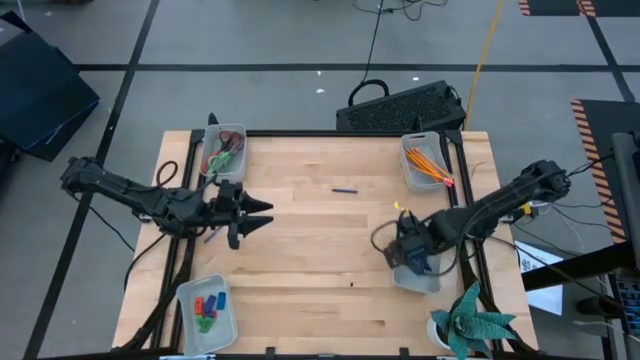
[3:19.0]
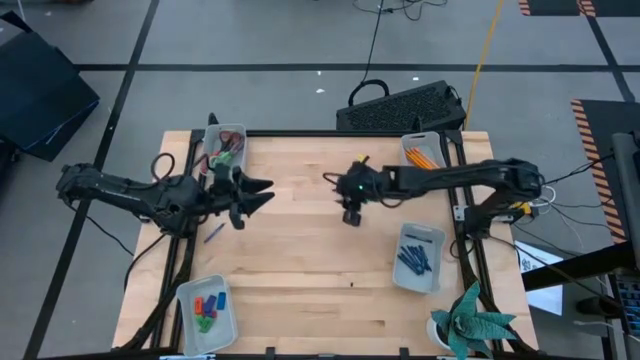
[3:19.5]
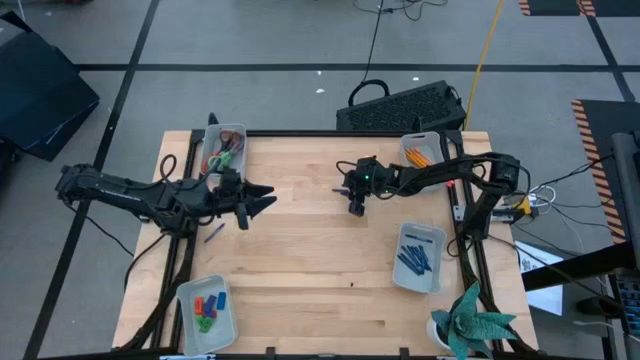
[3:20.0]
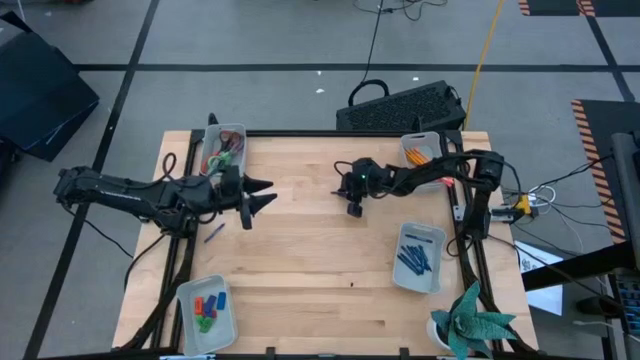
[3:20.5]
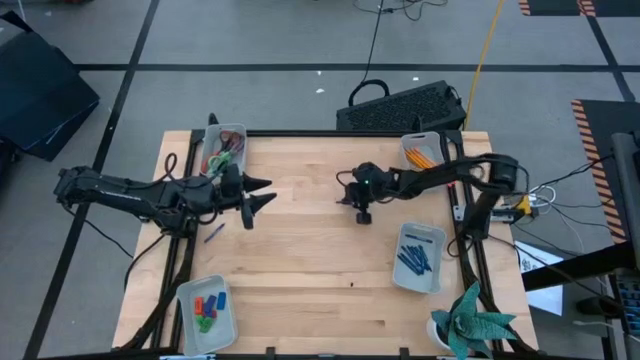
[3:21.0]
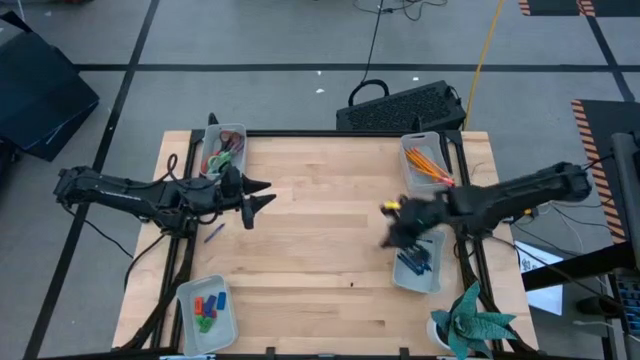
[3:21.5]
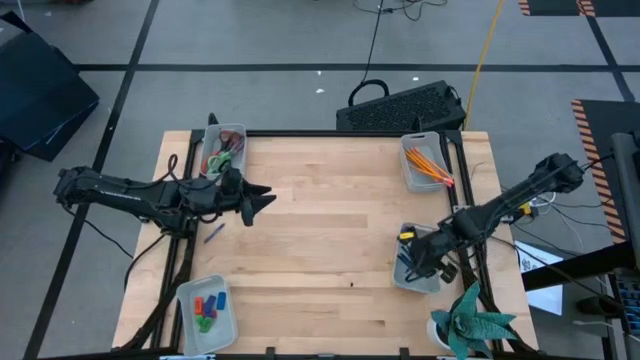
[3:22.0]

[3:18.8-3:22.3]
Task: Sort crayons/erasers/pens/pencils in bins
Put the blue crayon into the middle right gray bin

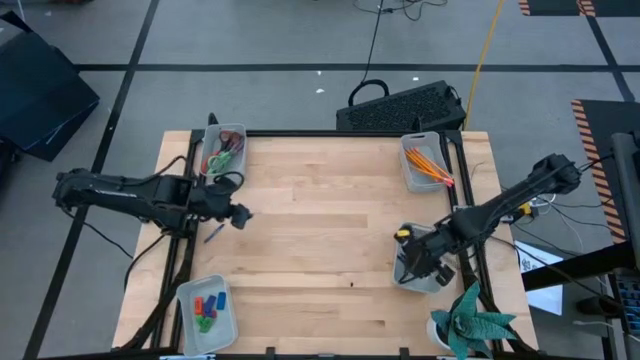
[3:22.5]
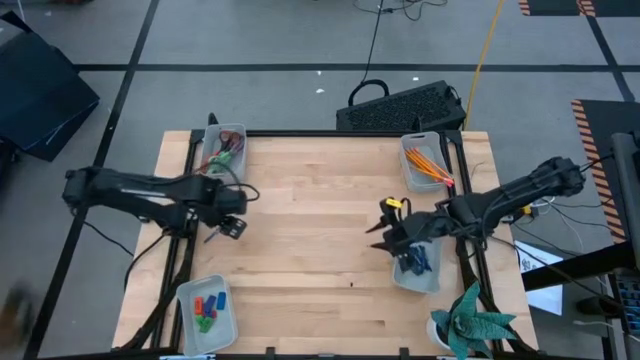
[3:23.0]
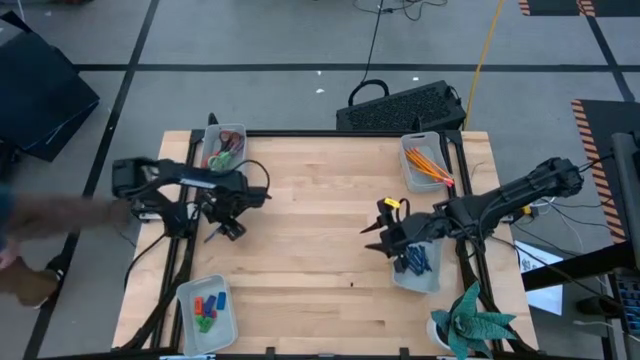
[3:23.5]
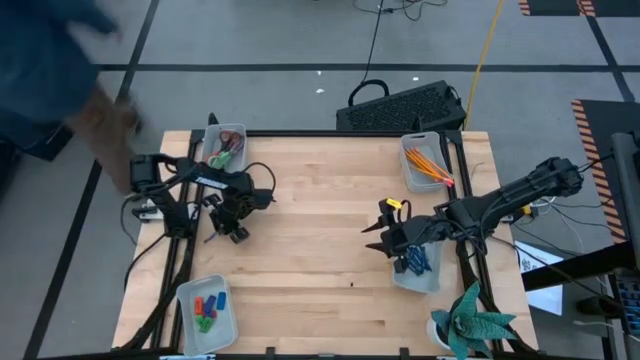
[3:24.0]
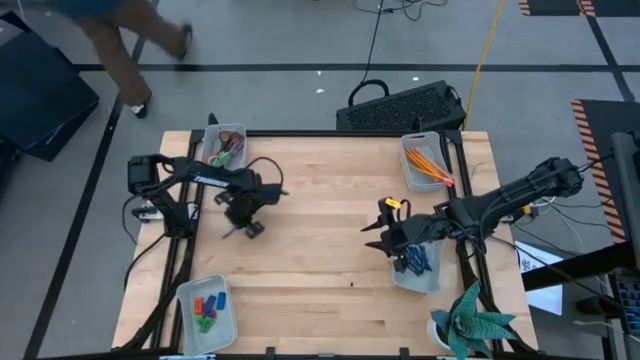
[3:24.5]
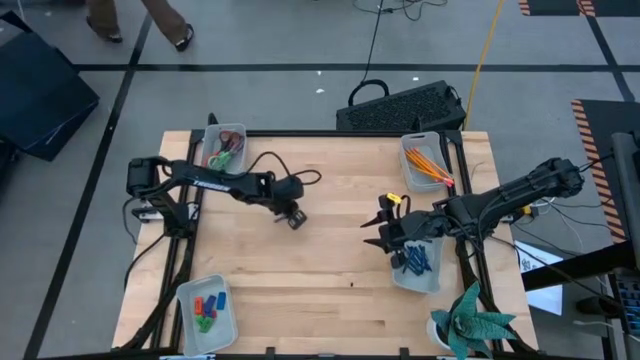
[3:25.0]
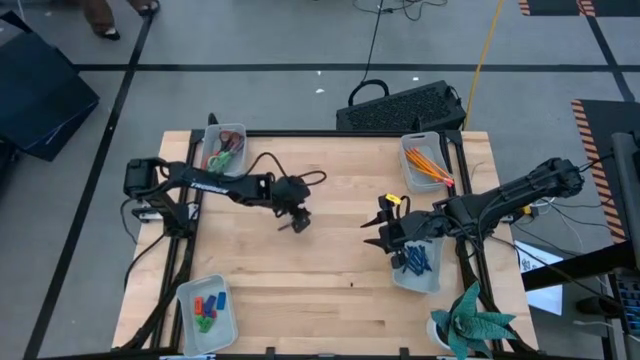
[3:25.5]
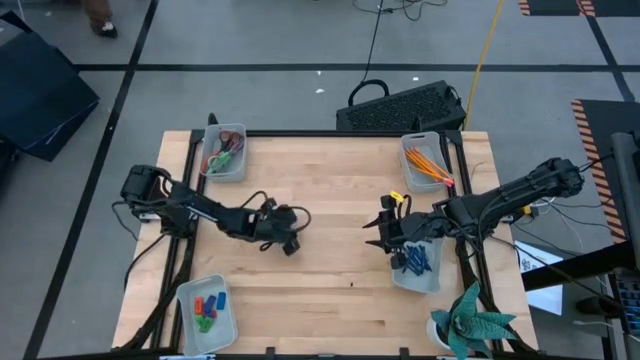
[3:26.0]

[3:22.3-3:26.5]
Put the blue crayon into the middle right gray bin

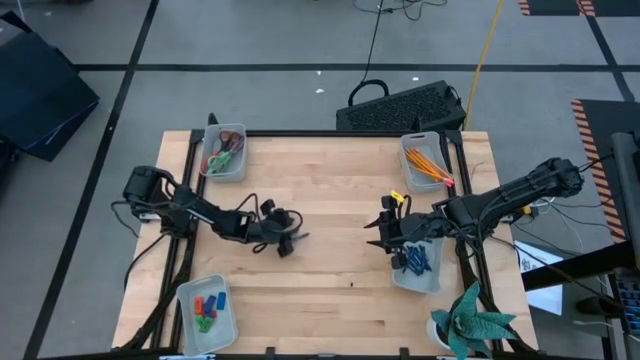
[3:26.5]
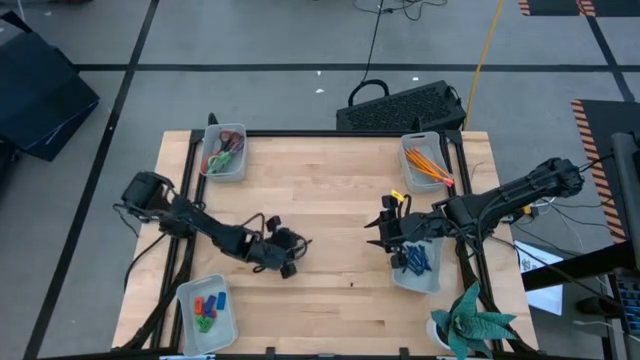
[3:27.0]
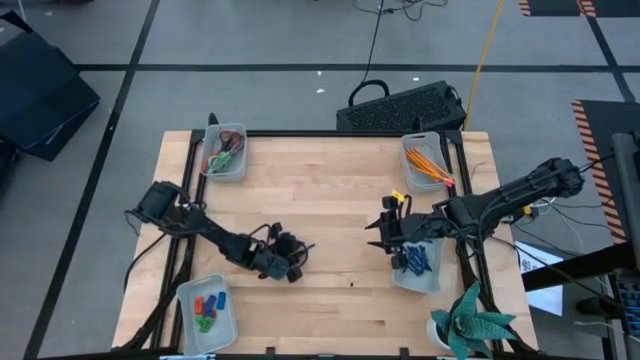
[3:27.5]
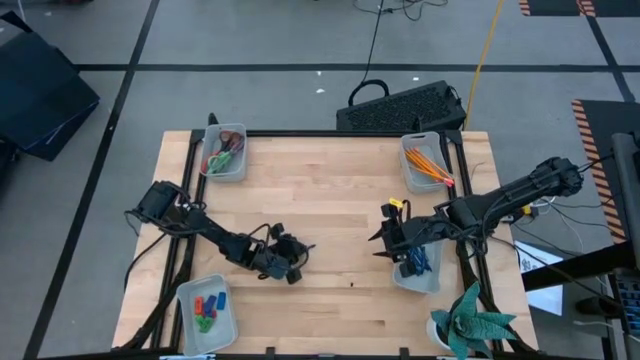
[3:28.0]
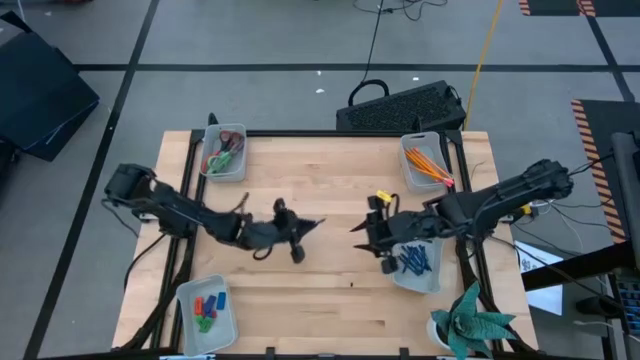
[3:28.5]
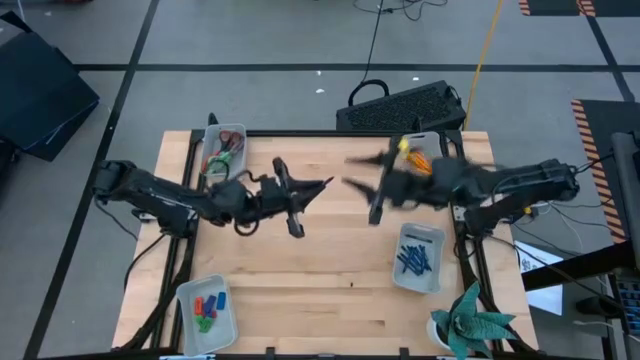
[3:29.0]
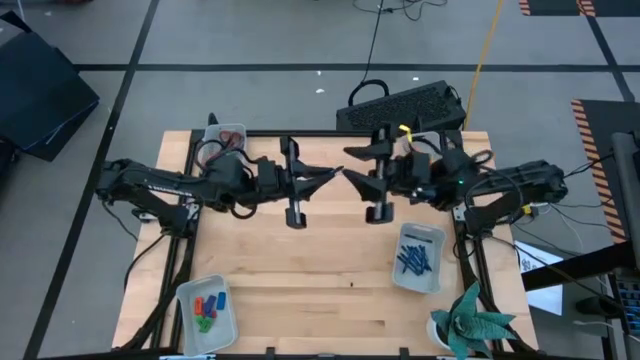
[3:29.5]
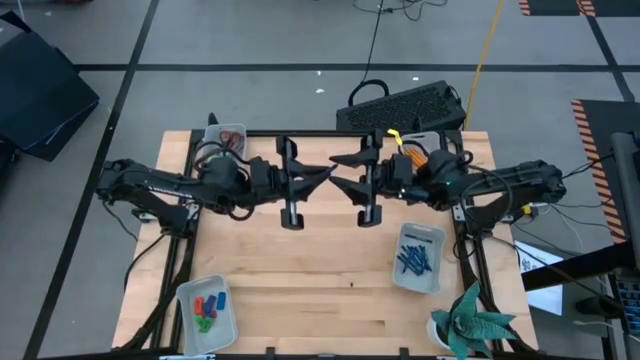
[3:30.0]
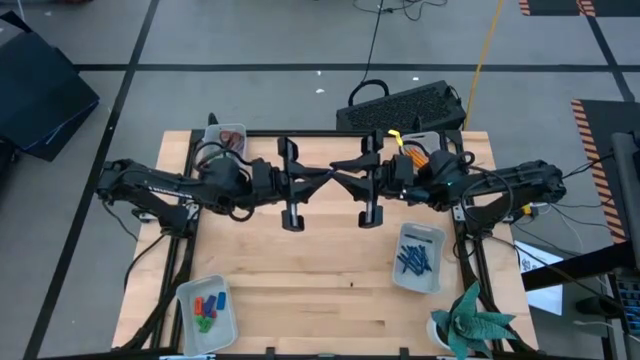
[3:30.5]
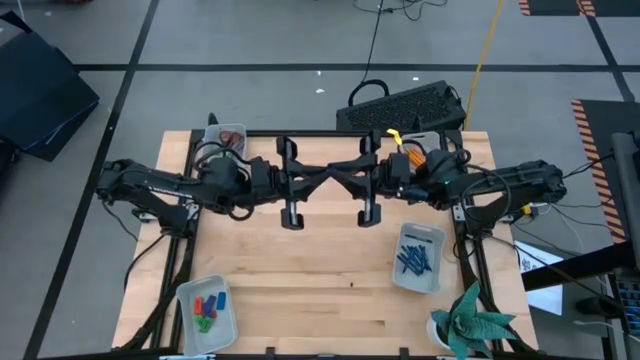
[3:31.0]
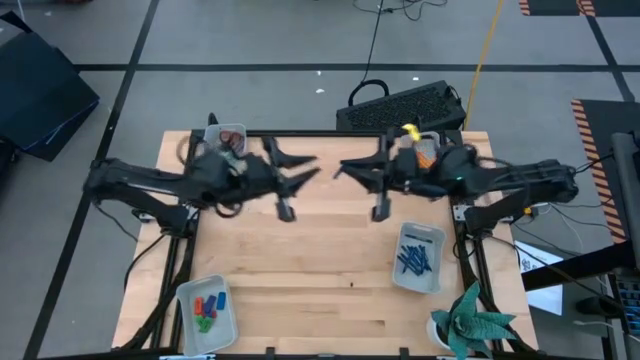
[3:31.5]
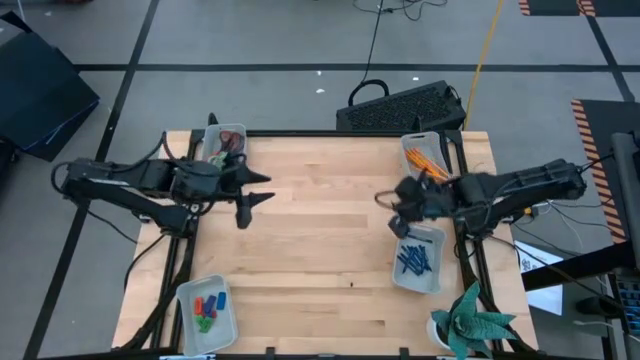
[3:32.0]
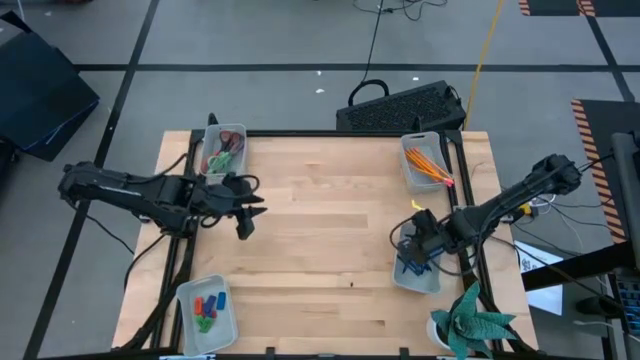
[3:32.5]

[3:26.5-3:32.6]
Put the blue crayon into the middle right gray bin

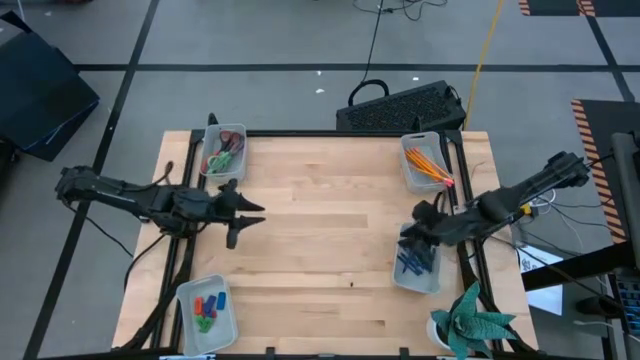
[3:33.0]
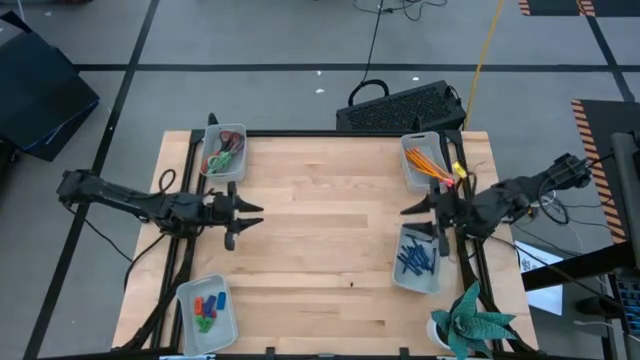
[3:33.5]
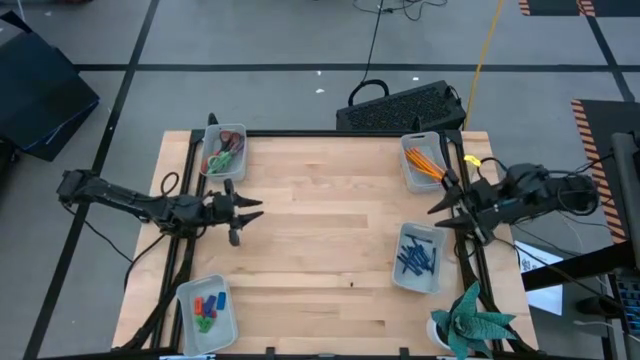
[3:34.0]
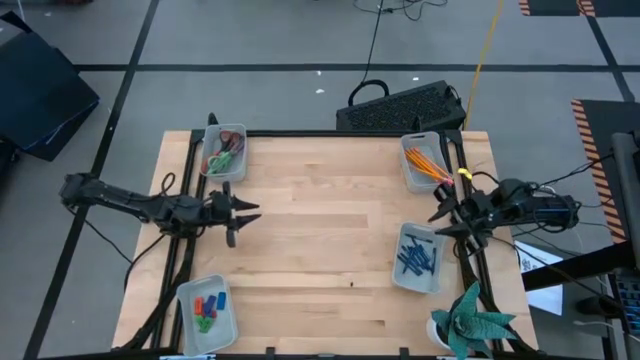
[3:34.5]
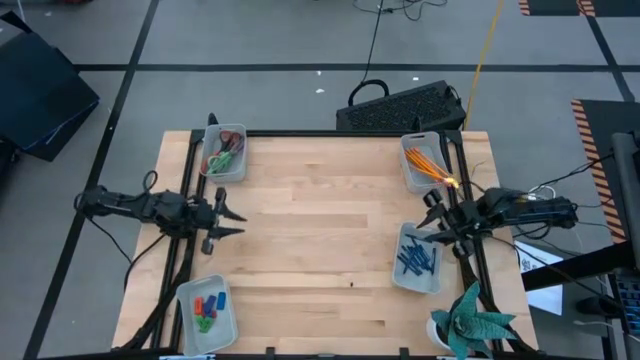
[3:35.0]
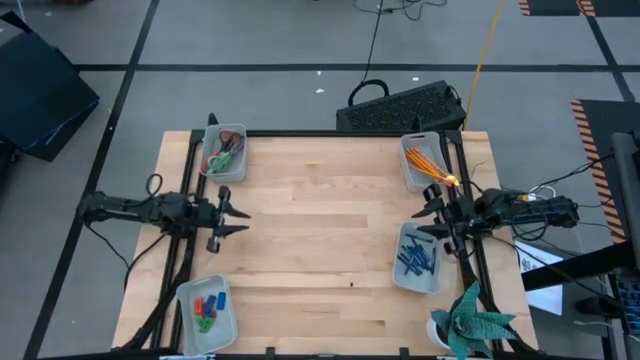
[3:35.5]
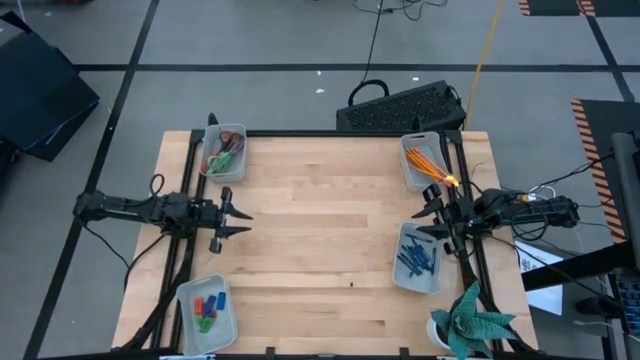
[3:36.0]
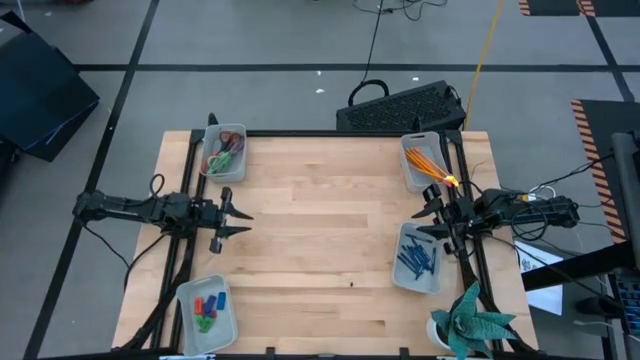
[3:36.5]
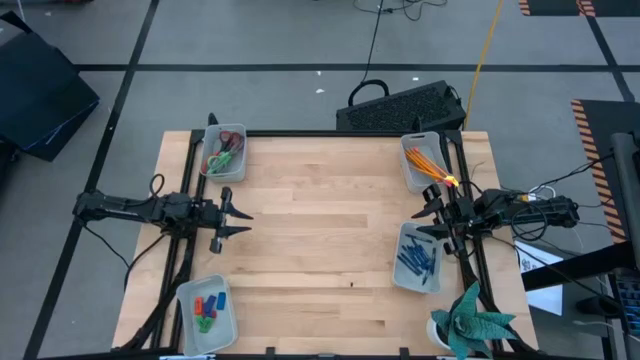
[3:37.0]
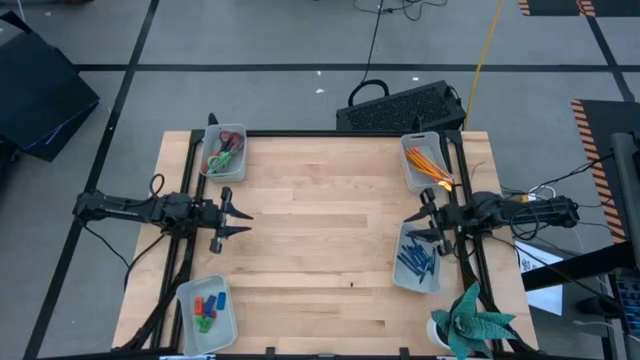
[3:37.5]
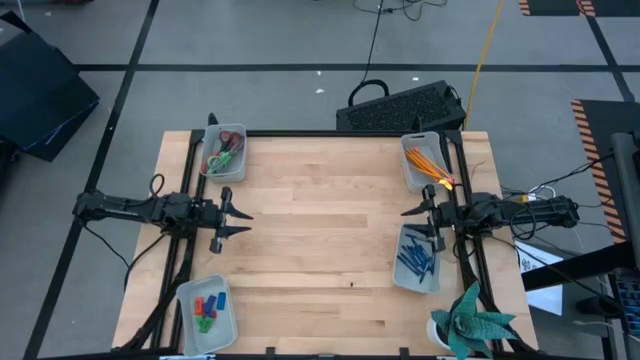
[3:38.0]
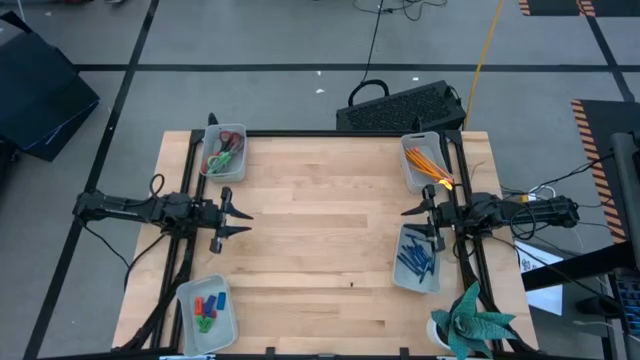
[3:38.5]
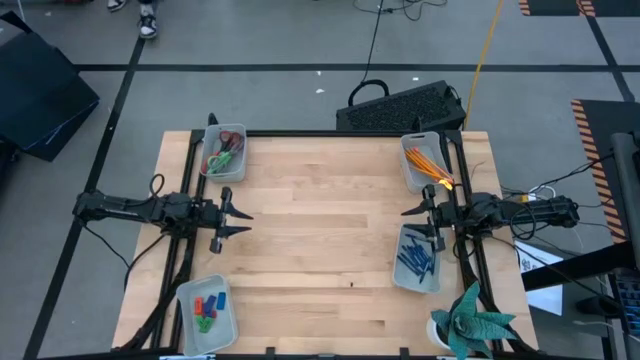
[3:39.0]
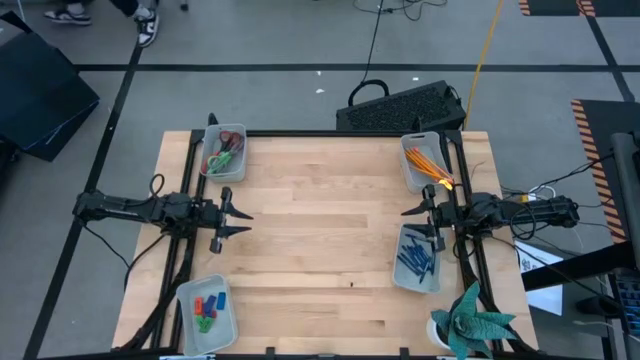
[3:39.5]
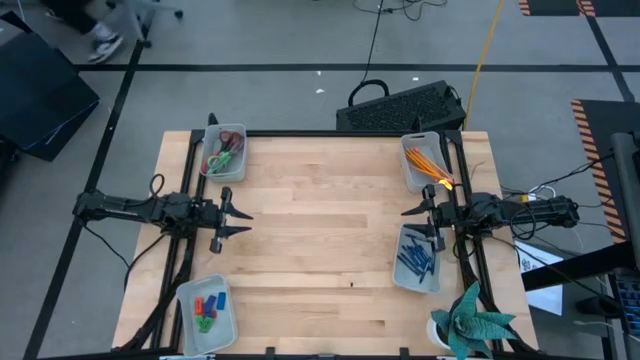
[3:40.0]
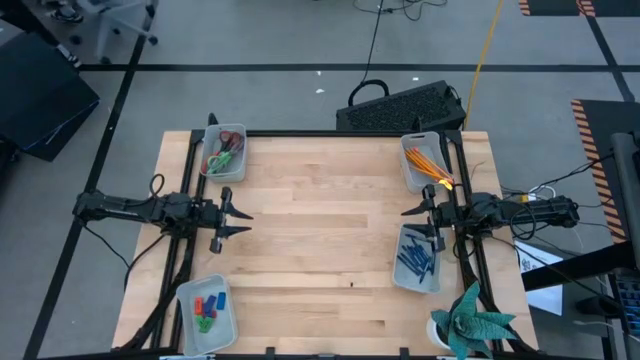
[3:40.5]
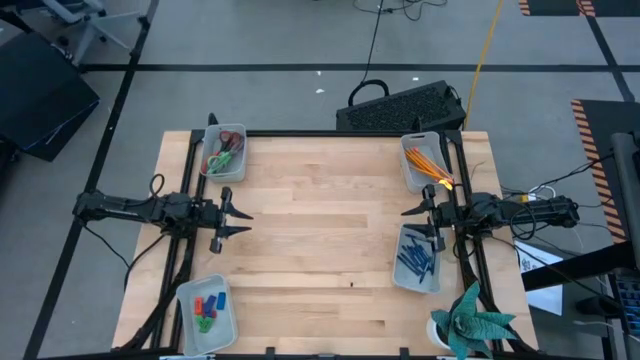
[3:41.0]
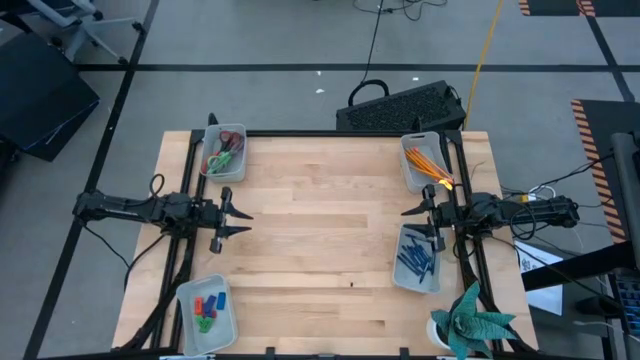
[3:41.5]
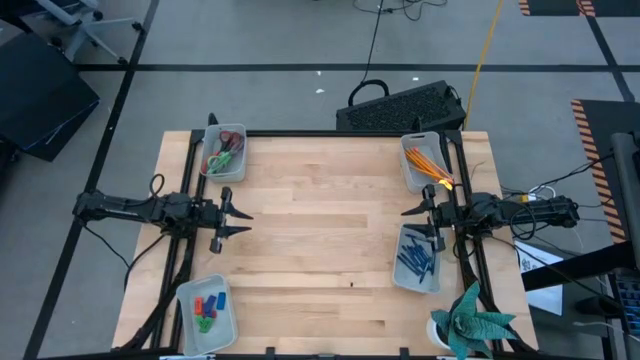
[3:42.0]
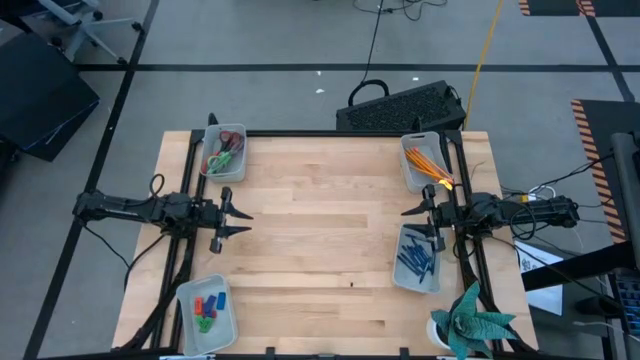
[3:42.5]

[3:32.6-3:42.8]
Return to Home Position
